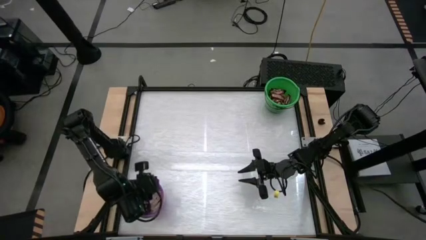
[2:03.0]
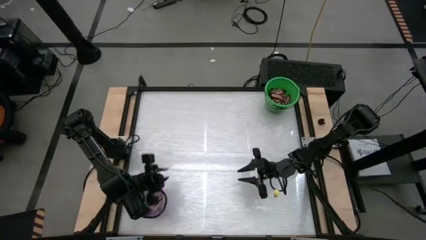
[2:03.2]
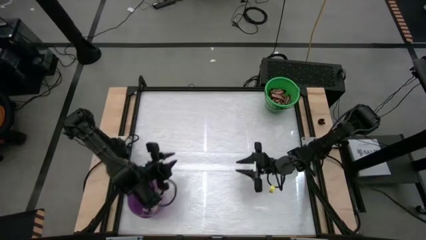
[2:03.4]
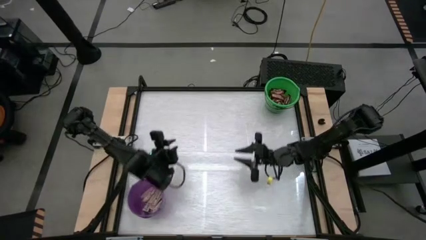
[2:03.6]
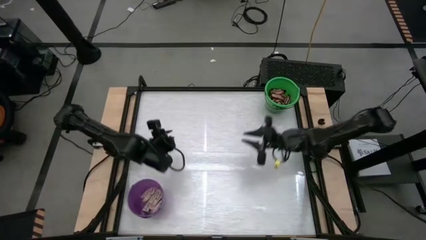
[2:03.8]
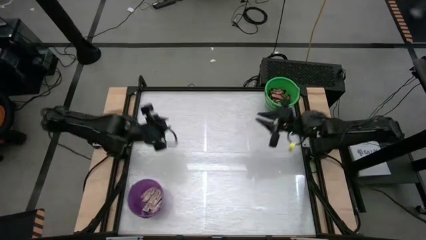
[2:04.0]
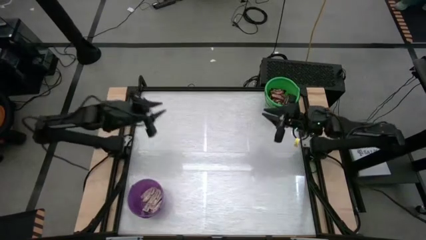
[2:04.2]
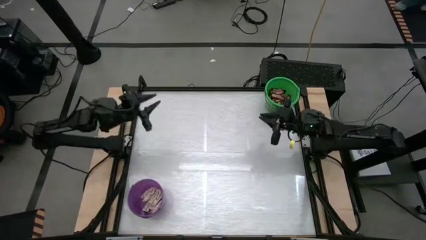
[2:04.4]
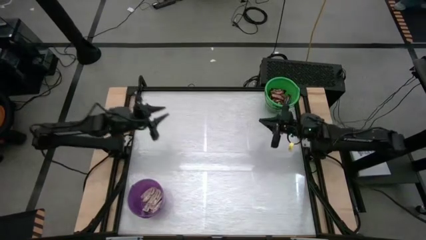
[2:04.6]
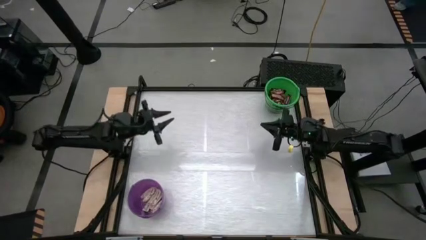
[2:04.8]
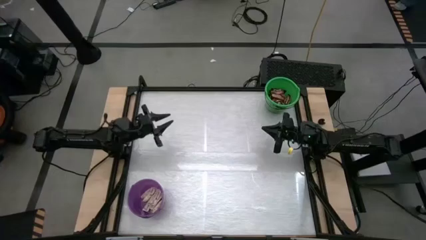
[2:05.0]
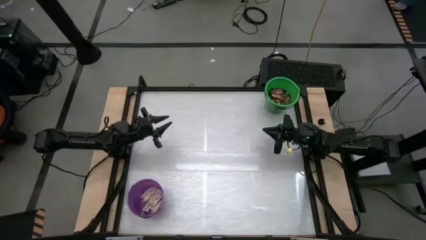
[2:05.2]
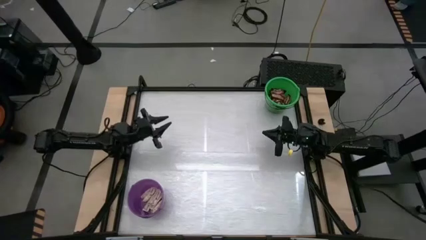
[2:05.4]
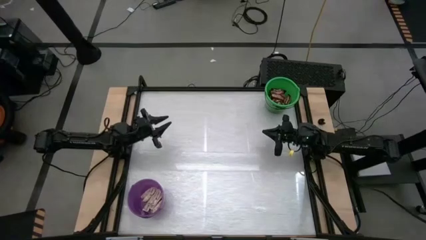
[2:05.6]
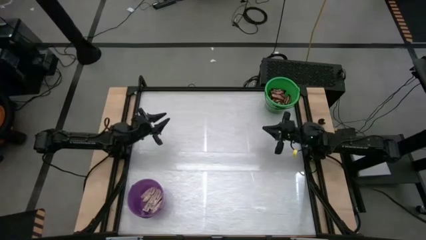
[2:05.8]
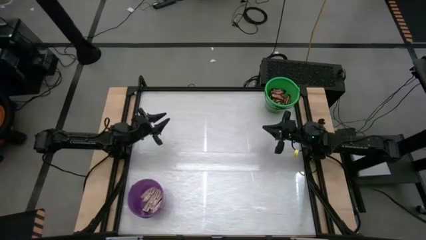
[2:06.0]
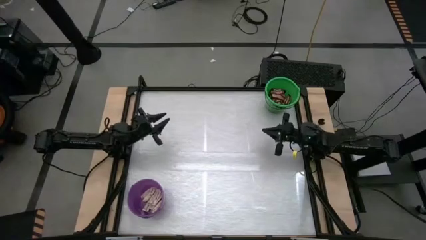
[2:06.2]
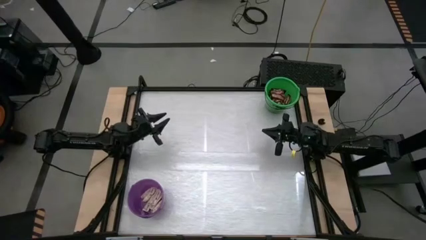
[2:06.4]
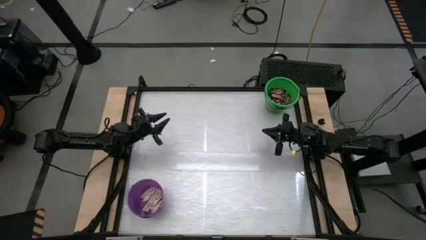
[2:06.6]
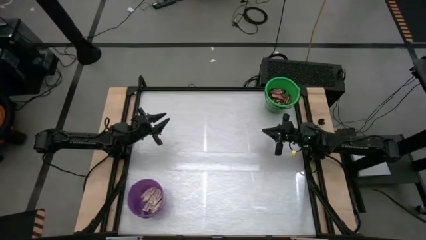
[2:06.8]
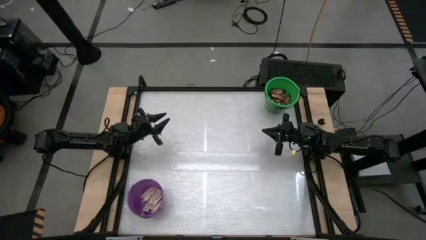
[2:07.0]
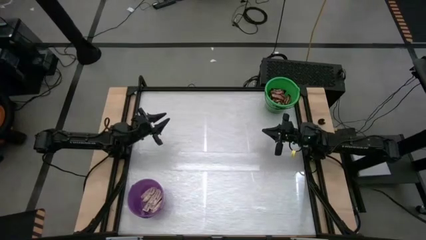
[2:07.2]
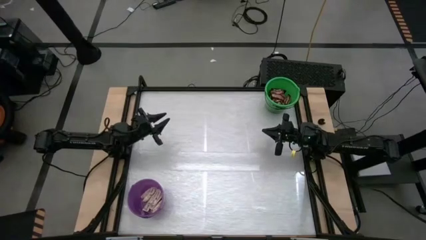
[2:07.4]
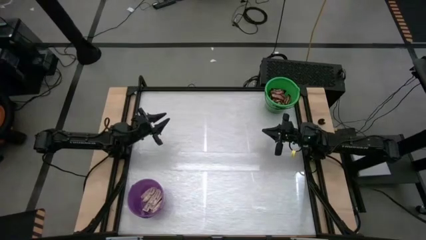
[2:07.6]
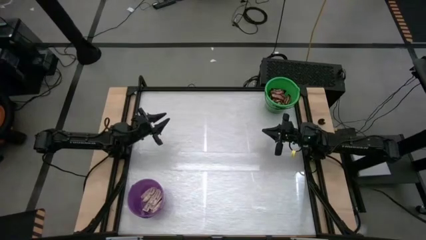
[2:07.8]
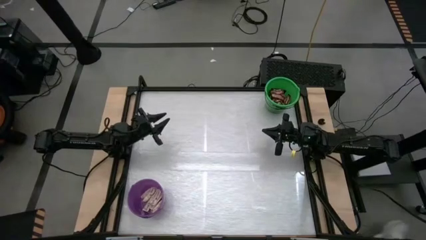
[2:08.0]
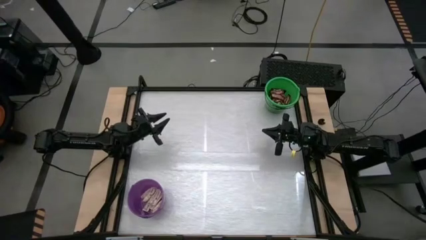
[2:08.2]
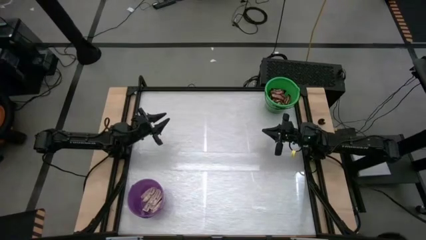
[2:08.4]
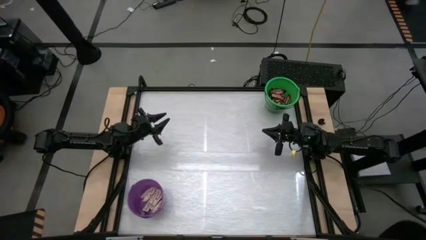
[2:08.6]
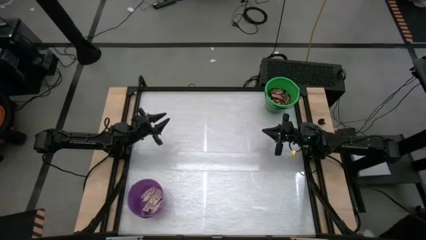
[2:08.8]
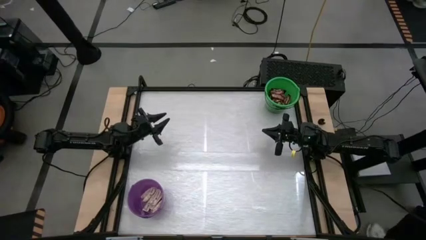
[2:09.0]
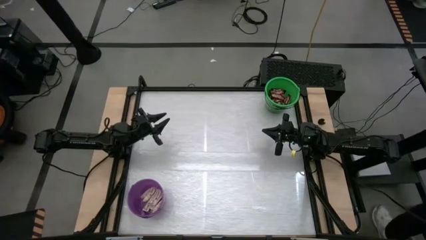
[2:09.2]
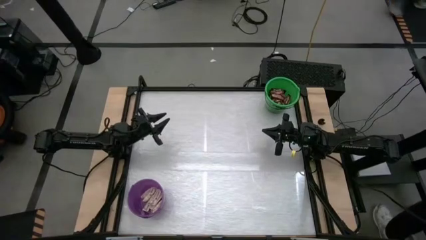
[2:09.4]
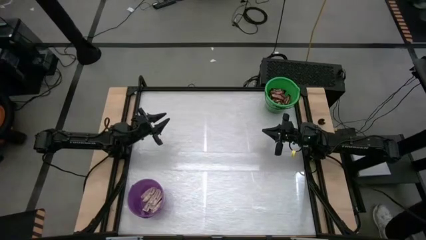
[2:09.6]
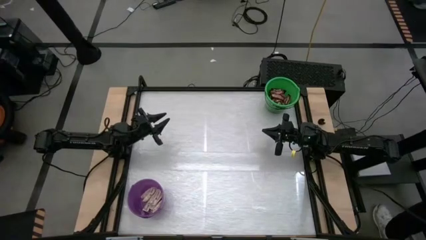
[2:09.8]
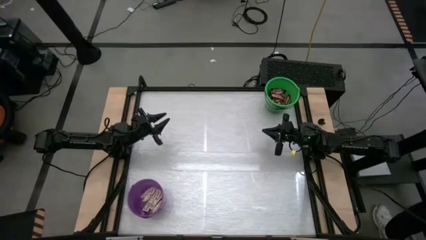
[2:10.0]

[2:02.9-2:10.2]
Task: Sort candy by brand, put in halloween buckets
Return to Home Position

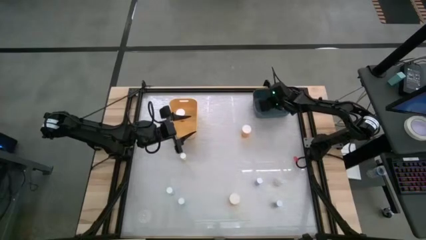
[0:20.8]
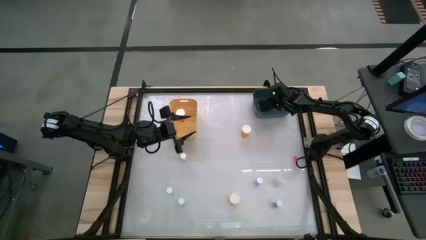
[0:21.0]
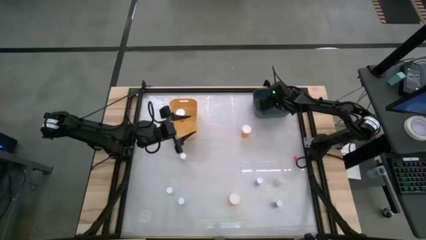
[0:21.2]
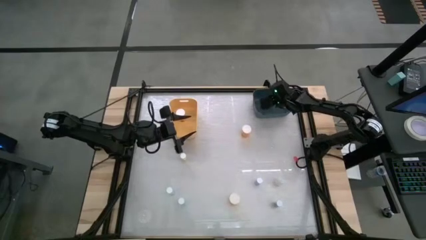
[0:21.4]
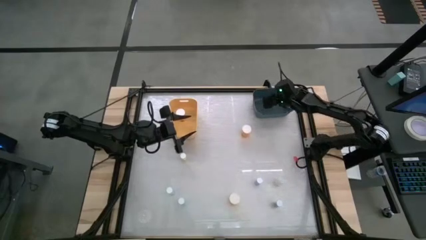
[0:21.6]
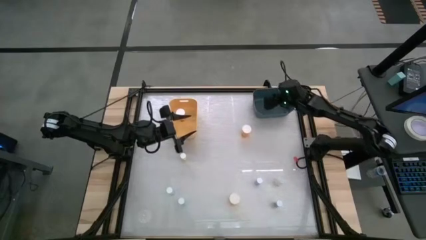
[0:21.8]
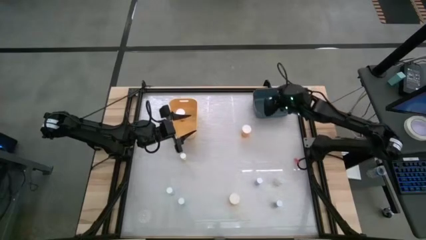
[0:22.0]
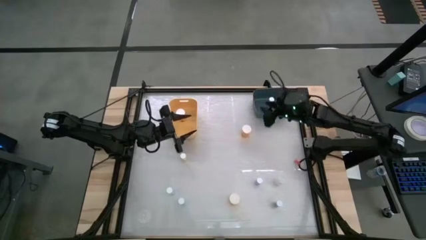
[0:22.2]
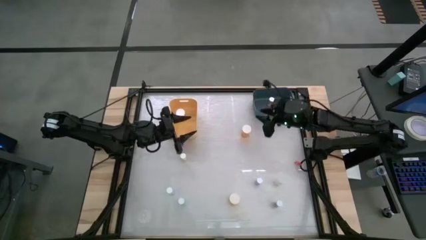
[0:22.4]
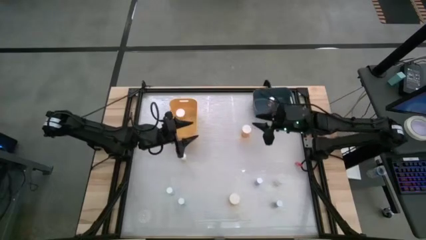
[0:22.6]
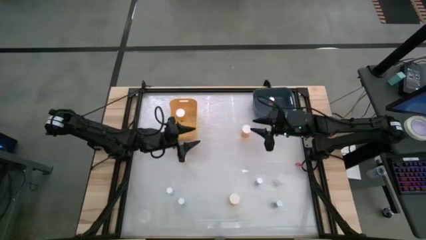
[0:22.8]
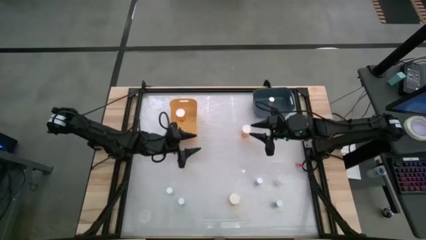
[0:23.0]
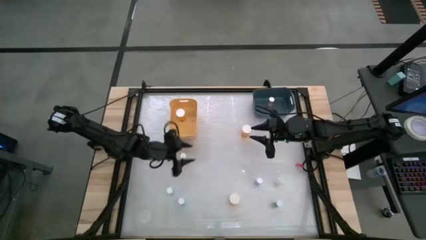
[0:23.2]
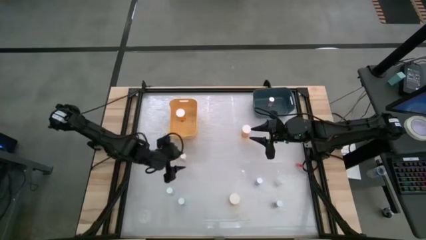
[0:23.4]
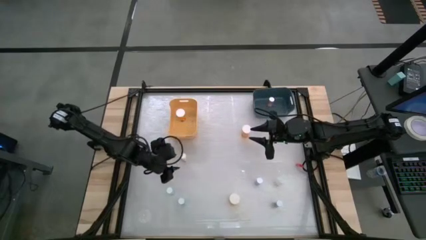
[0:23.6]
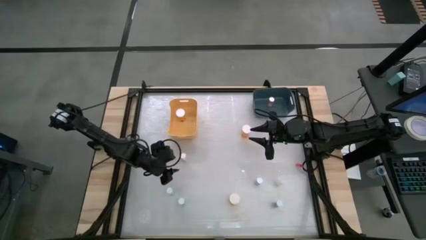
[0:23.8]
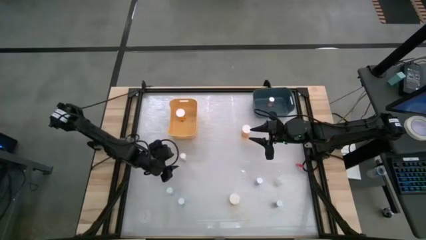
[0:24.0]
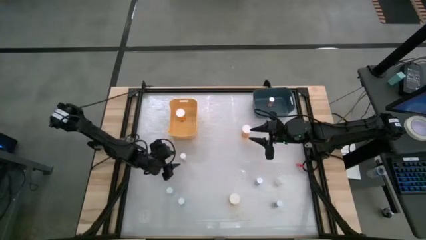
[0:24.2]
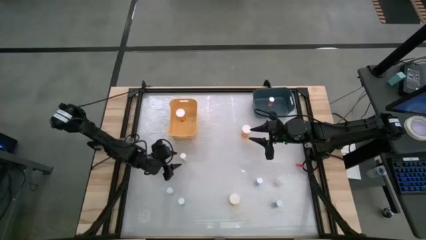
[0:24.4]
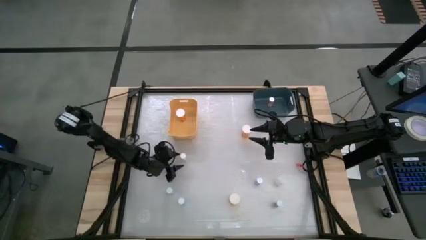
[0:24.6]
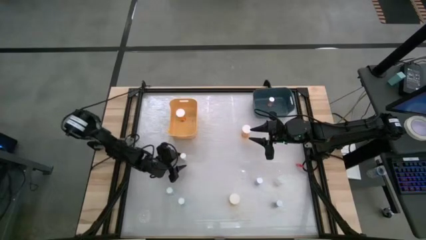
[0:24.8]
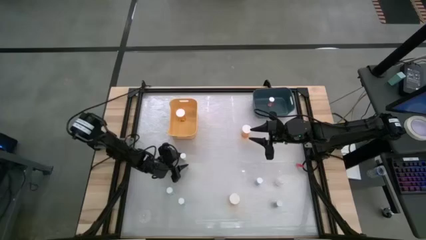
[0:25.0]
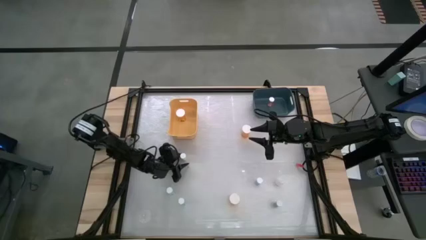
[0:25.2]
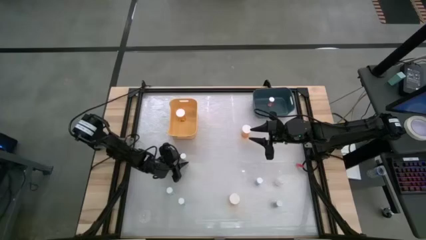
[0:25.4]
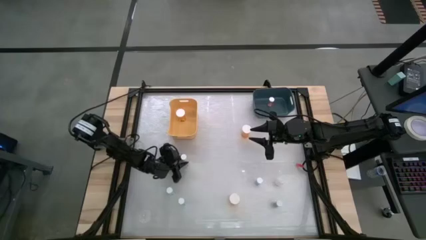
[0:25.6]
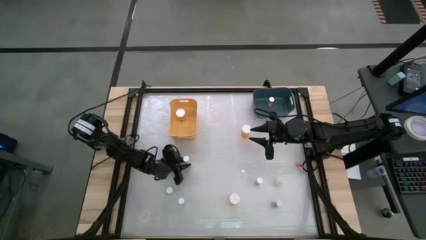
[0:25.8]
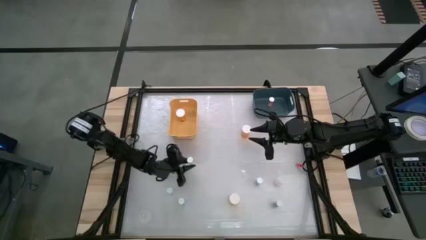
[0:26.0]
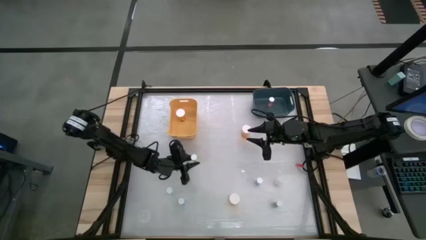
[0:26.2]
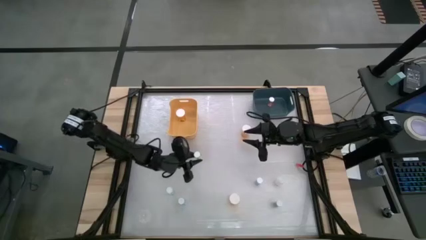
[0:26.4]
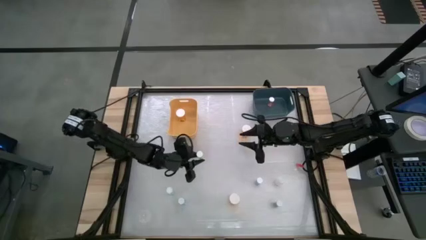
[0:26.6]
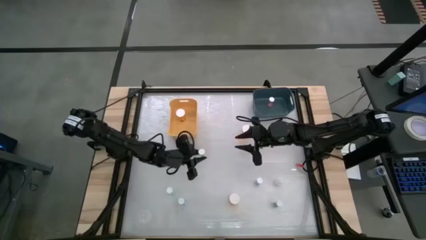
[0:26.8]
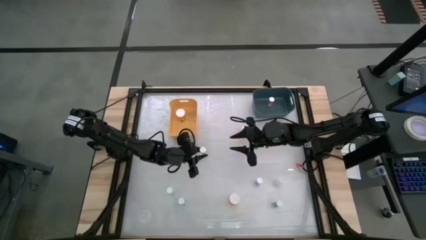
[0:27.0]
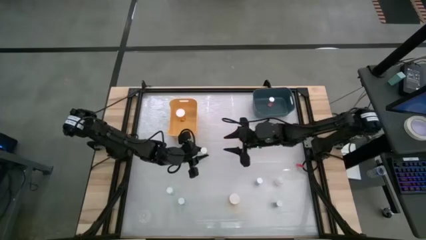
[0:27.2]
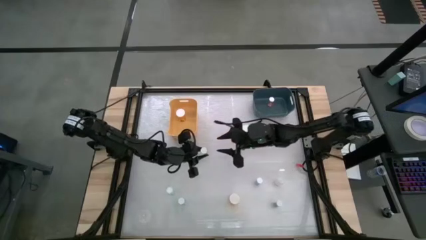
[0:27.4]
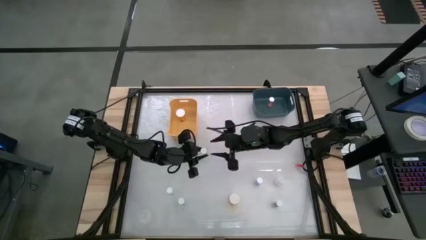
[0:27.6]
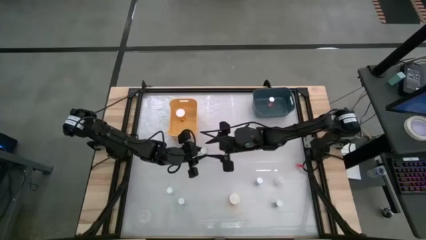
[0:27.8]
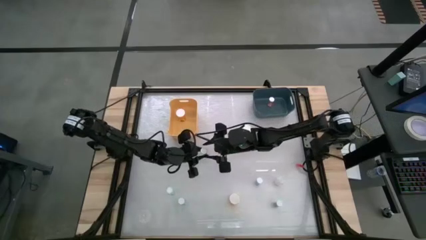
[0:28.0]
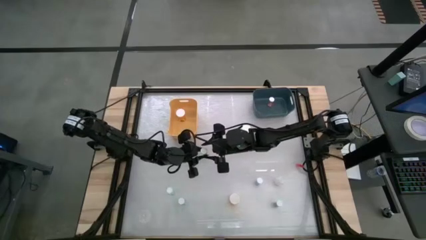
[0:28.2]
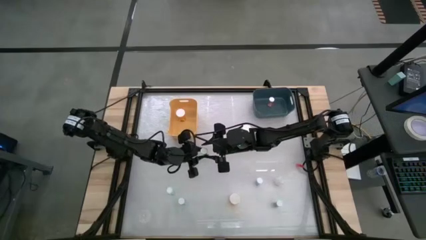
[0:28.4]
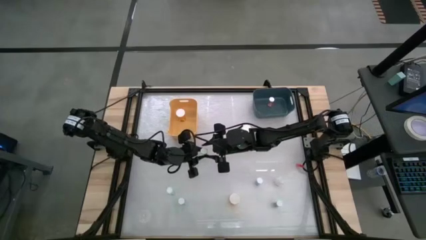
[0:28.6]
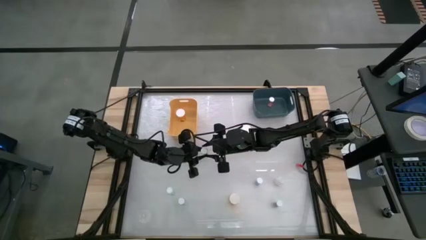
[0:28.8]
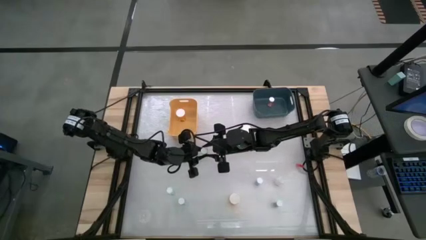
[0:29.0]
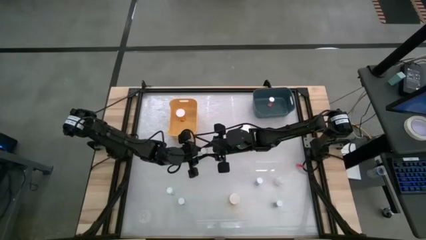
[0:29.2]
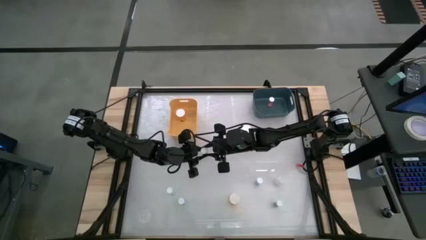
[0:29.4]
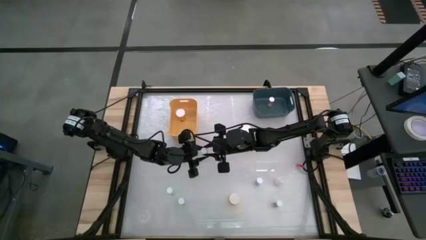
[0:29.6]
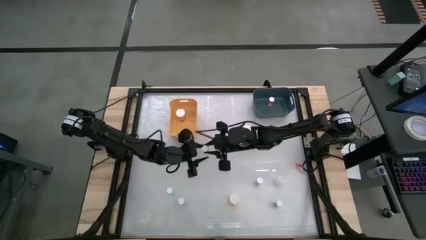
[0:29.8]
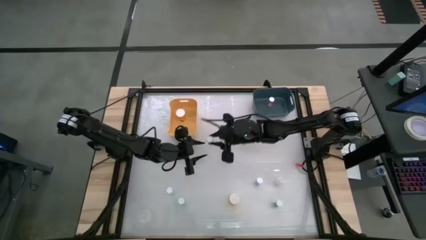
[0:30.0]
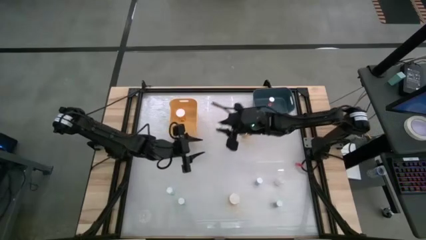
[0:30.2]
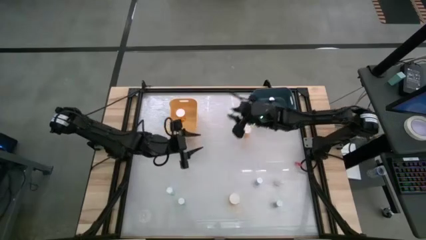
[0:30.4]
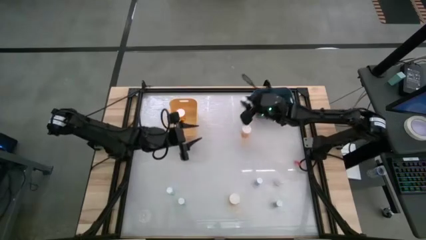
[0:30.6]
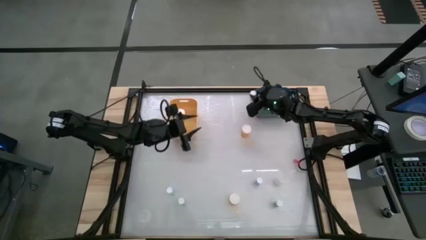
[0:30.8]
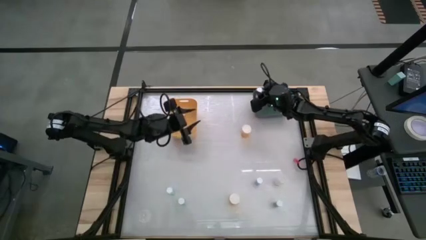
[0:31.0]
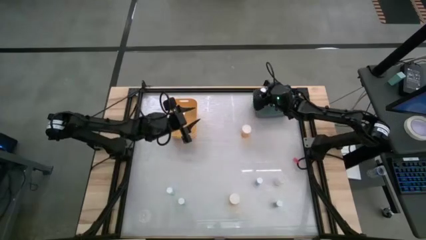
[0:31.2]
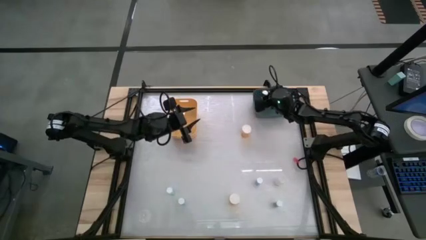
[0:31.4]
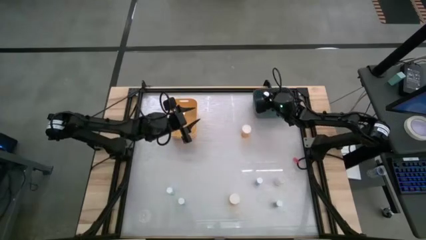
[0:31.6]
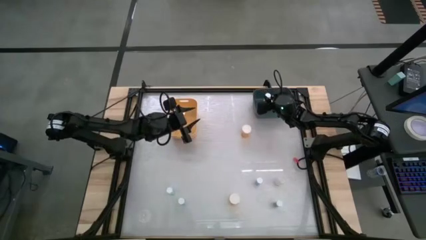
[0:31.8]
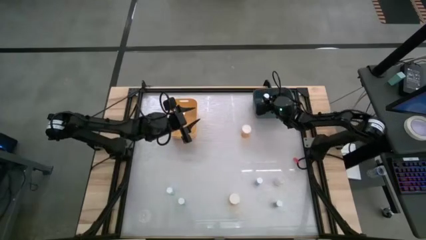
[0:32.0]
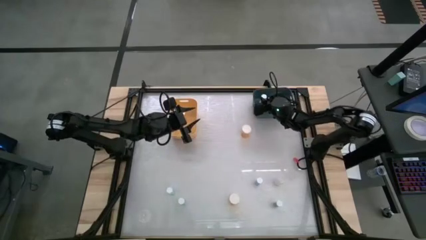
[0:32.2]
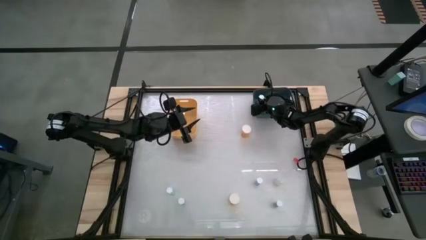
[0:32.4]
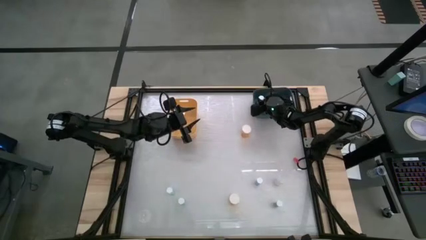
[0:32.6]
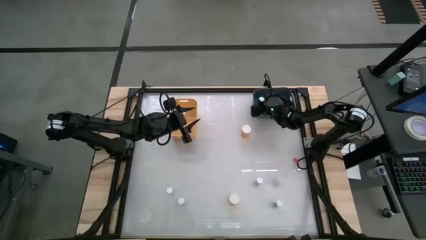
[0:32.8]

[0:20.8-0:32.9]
Task: Pick and place medicine bottles into bin by pill shape (circle, oval)
Put the peach bottle pill into the blue bin
